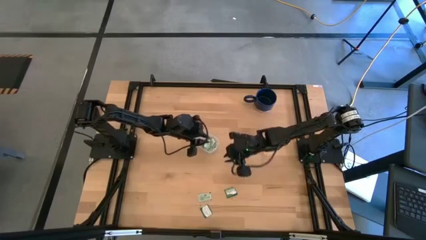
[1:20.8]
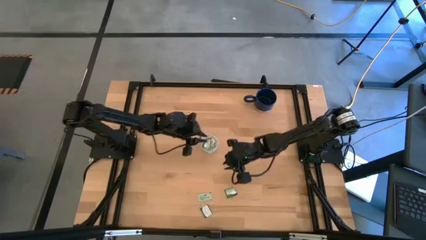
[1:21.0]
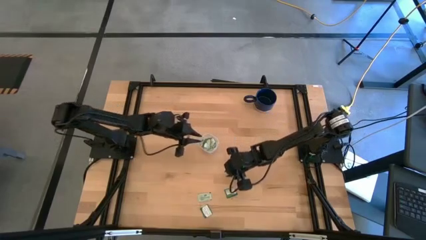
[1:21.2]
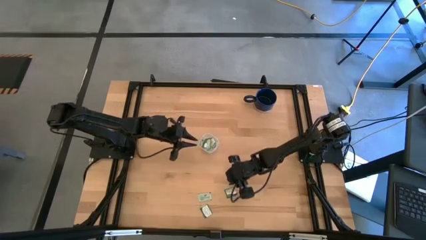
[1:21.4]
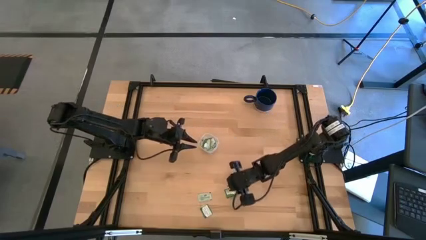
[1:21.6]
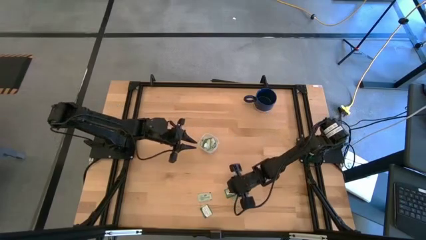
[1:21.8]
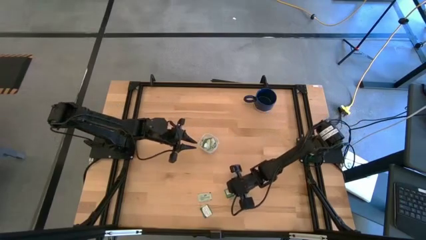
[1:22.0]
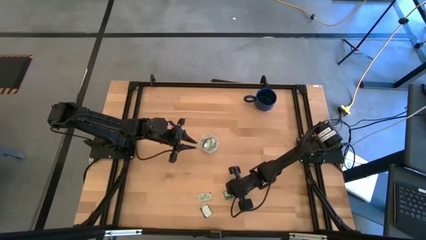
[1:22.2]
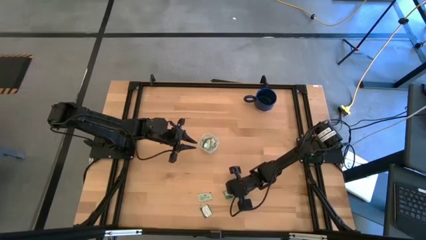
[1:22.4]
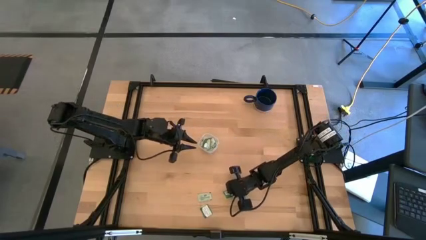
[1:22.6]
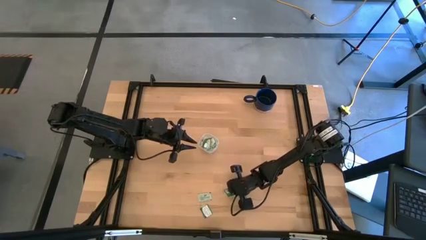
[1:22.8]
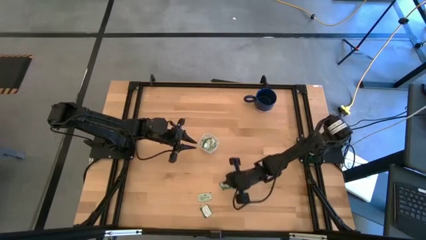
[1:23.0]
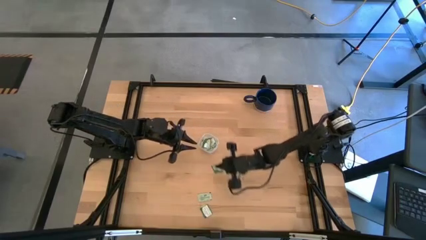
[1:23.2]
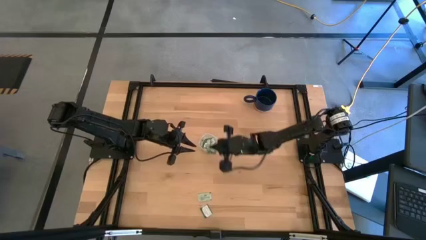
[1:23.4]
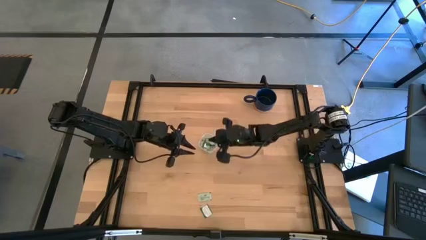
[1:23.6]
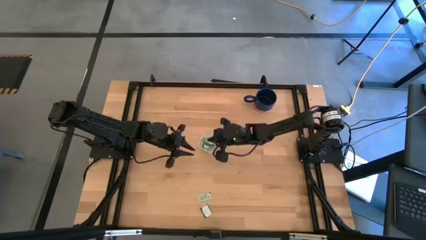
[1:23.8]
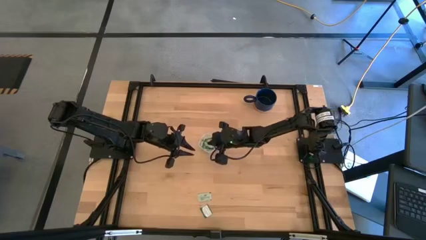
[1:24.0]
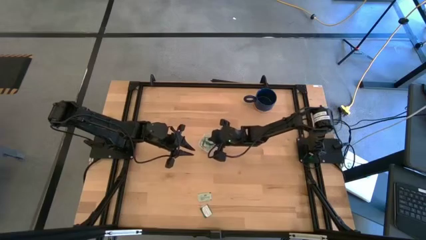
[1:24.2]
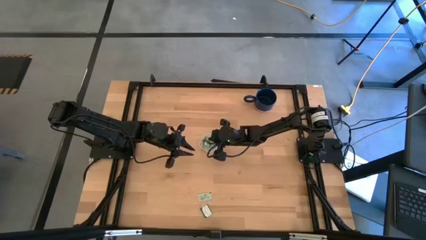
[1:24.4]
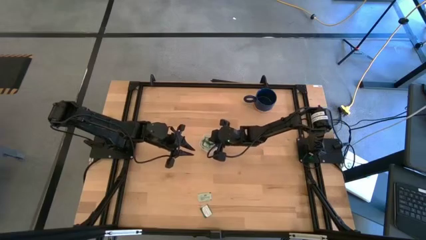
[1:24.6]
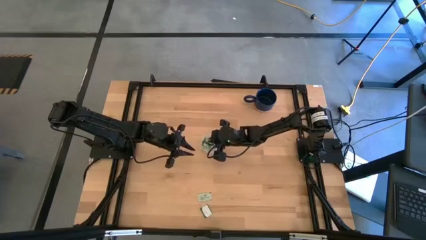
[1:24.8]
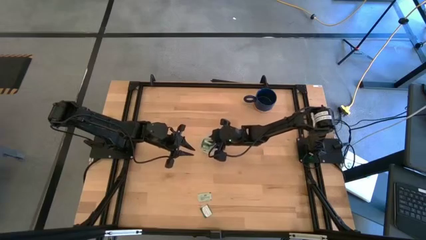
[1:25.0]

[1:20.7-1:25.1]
Task: Pick and place Stevia / Truvia into bins
Put the top right green stevia packet into the container

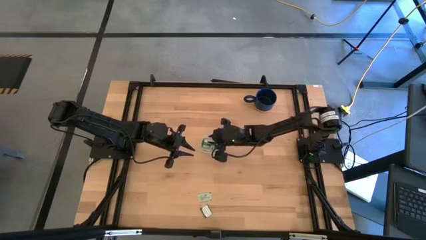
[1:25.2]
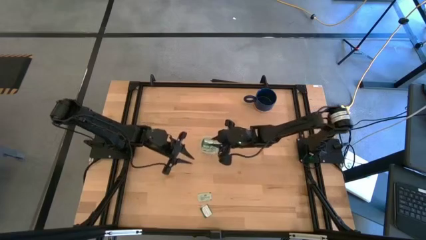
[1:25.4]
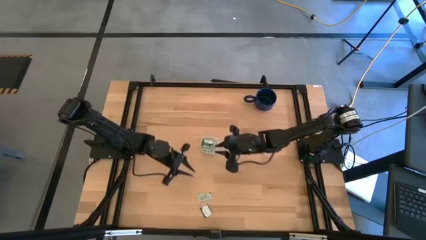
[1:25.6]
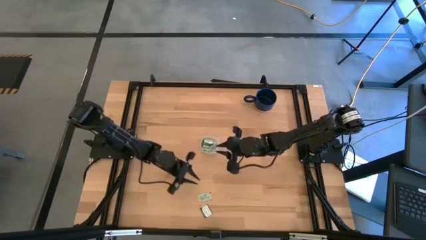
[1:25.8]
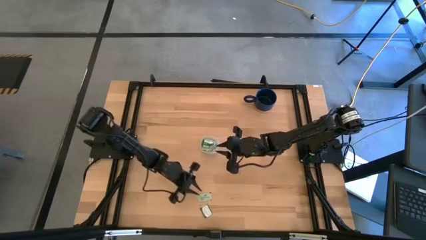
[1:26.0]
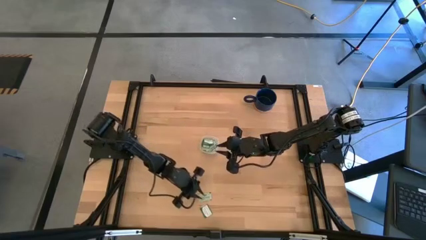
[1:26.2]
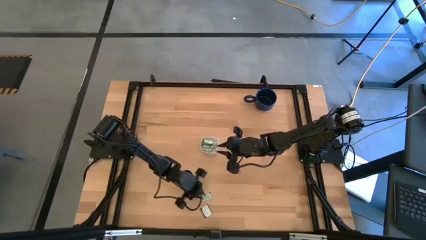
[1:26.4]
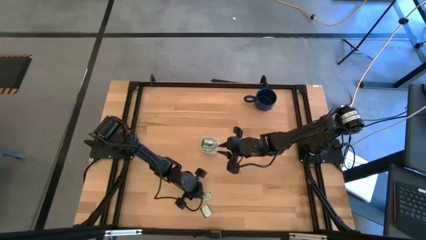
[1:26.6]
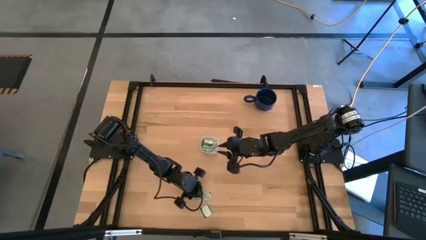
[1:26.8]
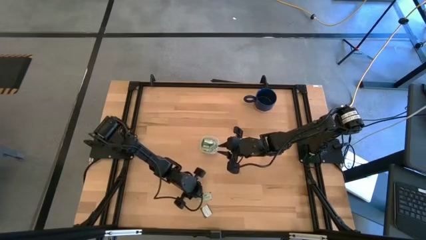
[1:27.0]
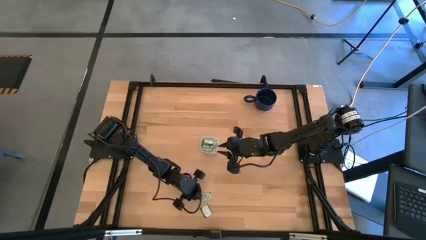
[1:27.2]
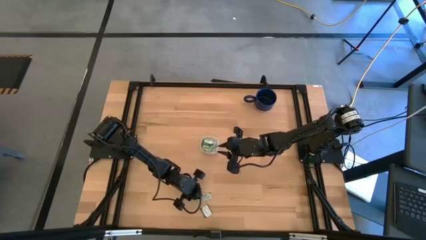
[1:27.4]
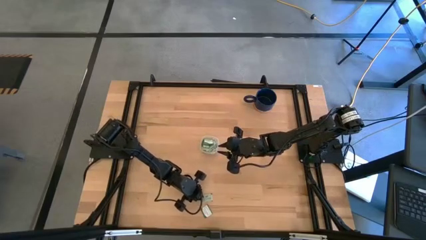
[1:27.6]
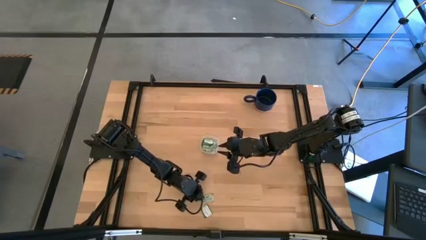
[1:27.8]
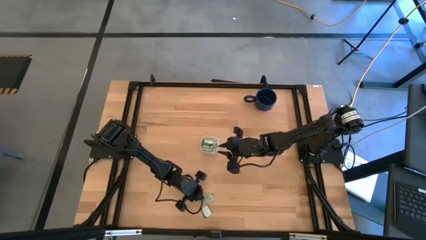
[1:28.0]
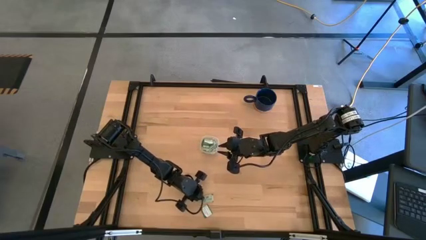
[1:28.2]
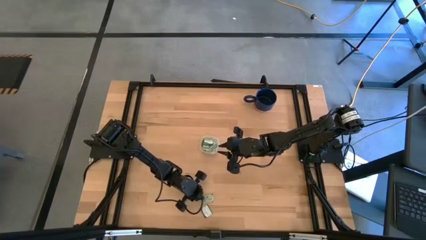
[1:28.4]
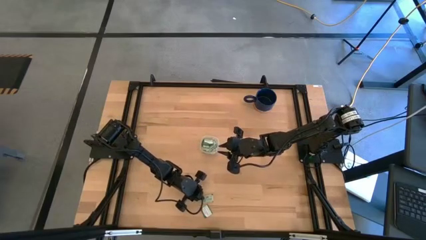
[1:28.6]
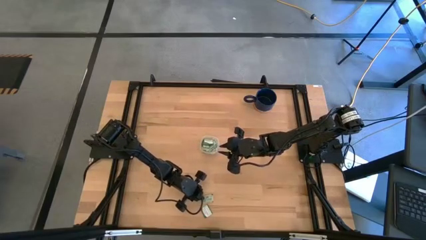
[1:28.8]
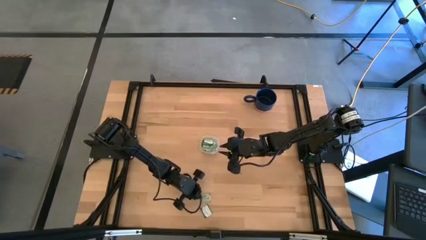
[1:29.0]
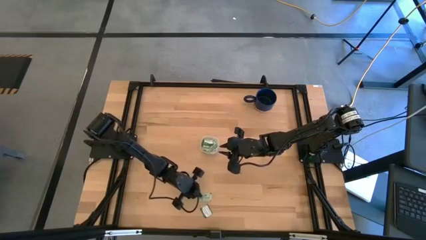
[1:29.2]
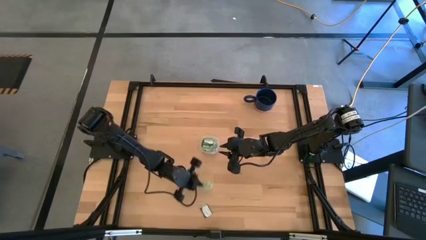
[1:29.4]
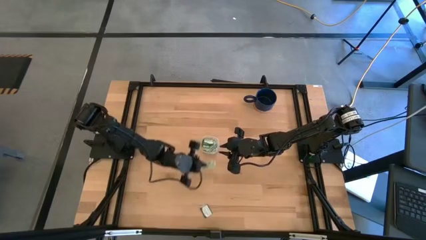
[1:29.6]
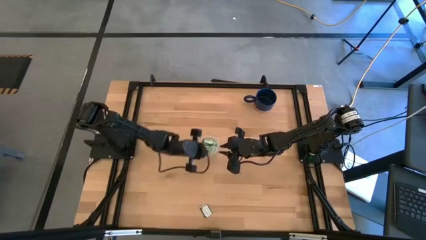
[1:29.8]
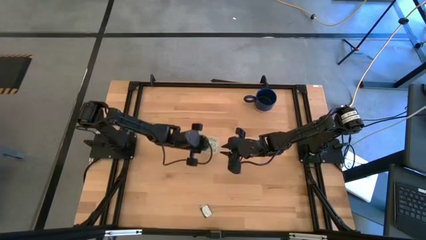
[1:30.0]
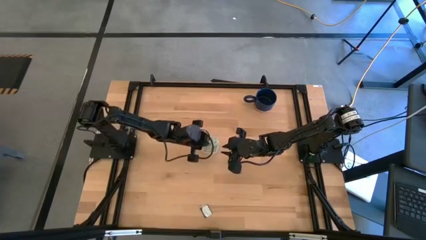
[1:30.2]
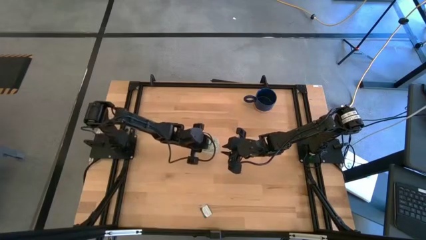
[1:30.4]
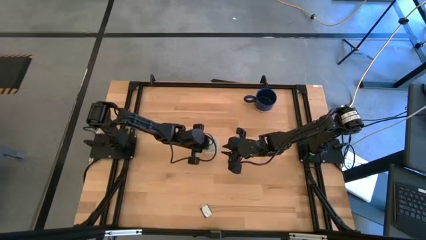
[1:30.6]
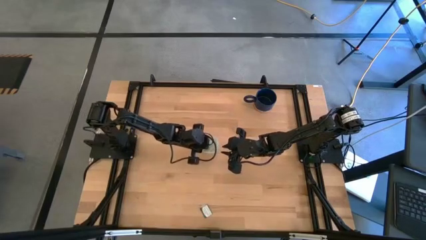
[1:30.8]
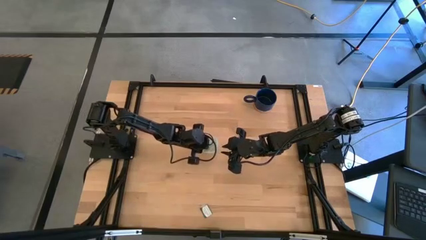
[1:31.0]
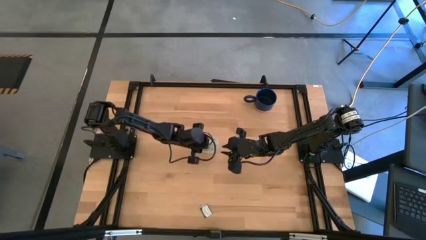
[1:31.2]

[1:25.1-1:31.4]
Put the light green stevia packet into the container

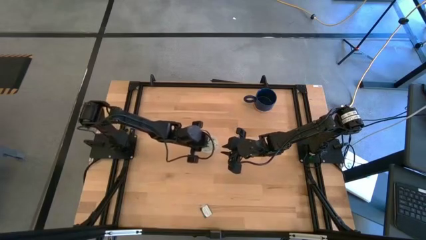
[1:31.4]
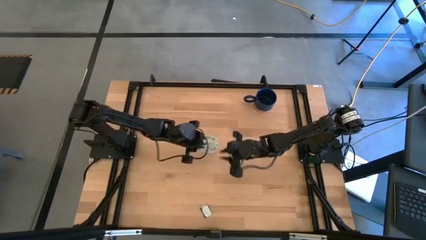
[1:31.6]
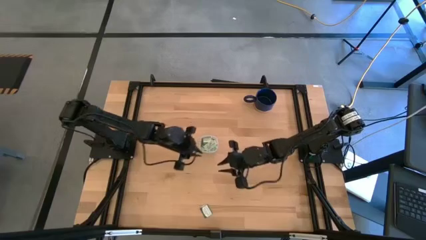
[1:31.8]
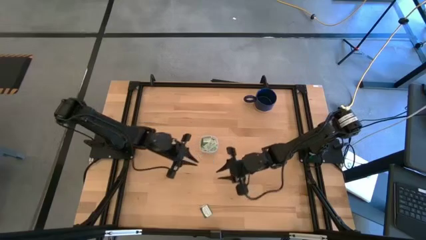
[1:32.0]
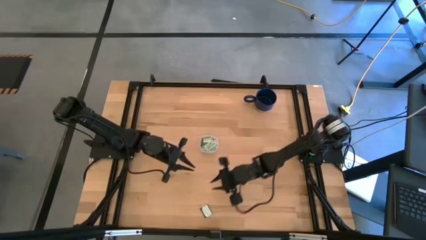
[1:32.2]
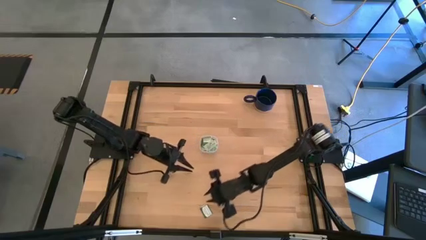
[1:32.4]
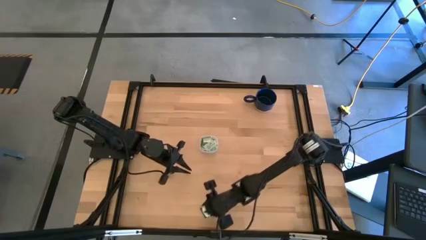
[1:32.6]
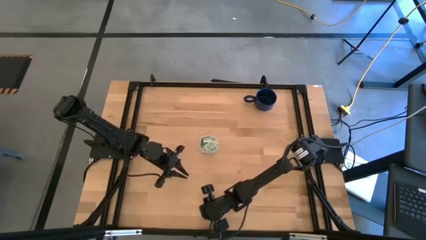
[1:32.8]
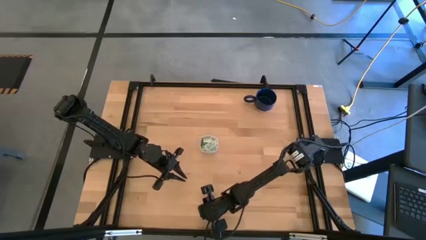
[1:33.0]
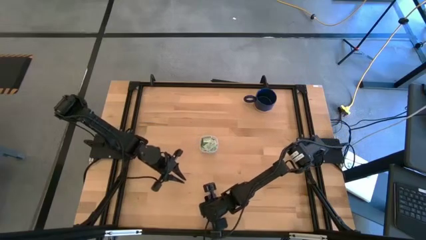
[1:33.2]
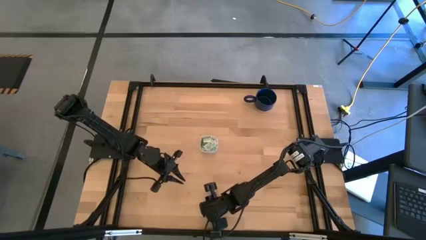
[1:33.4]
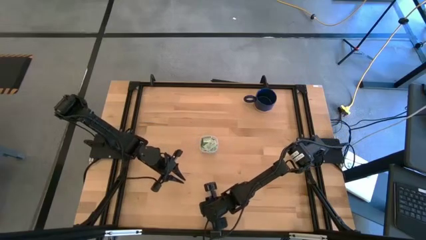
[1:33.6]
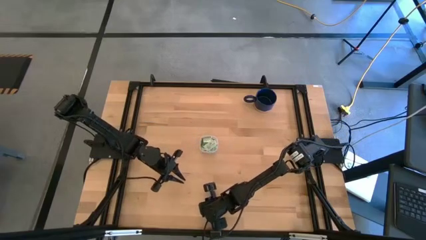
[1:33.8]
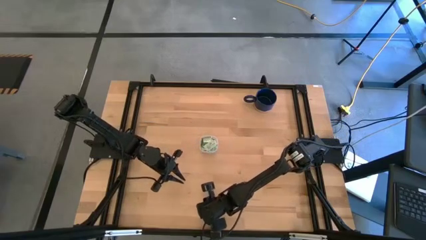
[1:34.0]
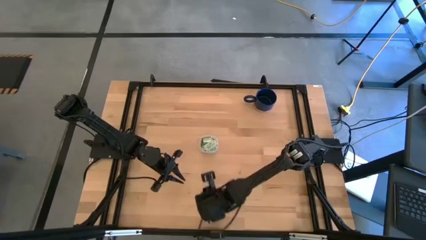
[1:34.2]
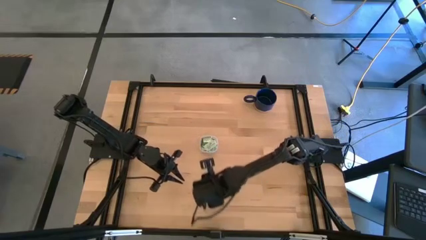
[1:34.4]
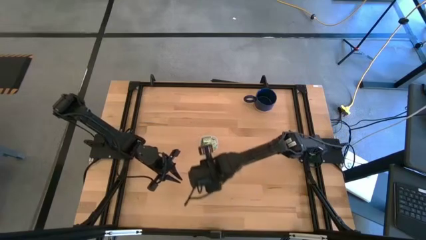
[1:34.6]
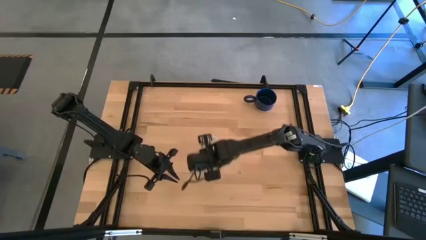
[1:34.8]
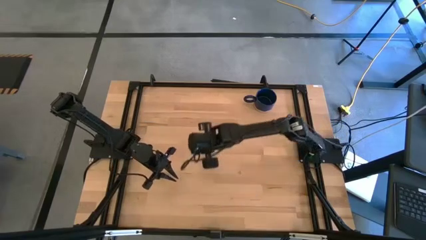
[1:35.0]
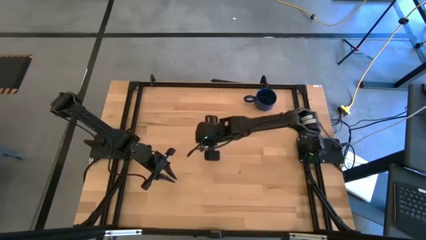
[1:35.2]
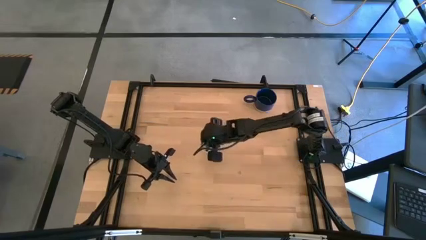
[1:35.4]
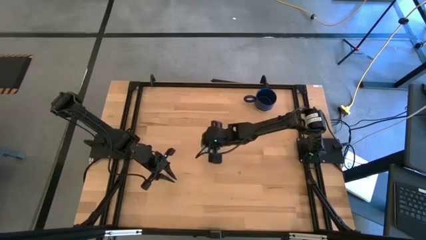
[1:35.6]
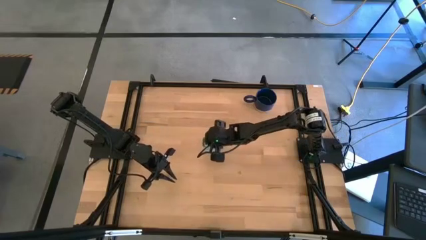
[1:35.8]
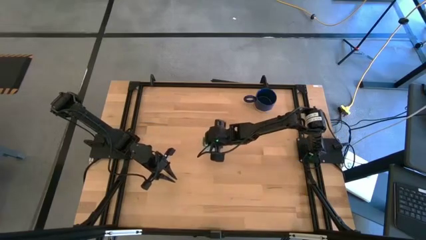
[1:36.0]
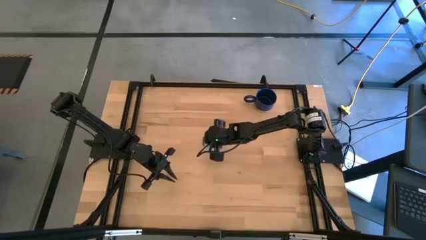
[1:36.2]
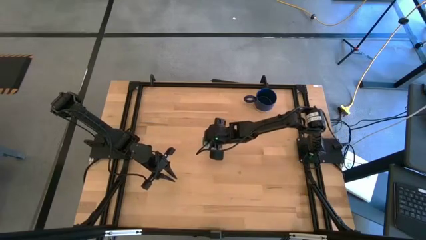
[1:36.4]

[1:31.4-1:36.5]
Put the green stevia packet into the container

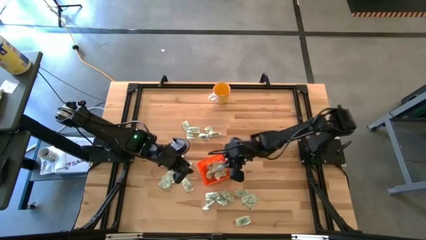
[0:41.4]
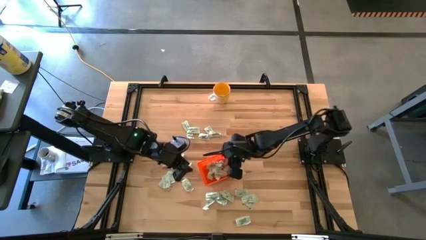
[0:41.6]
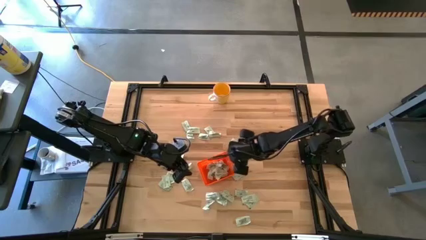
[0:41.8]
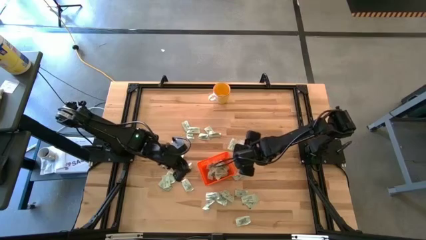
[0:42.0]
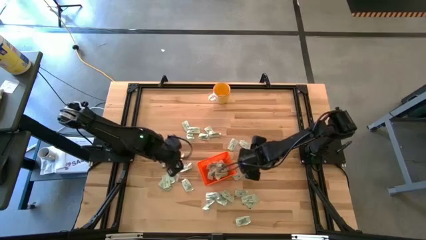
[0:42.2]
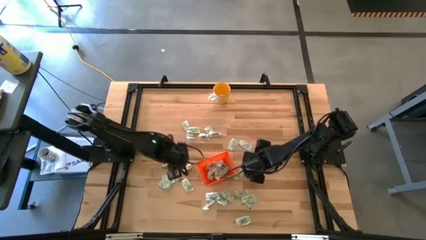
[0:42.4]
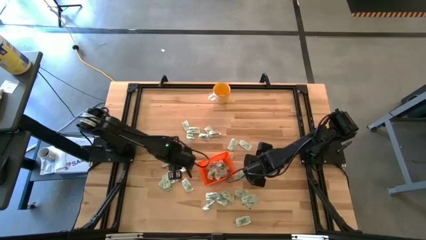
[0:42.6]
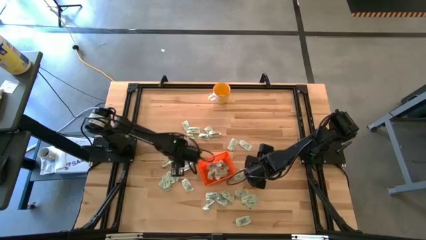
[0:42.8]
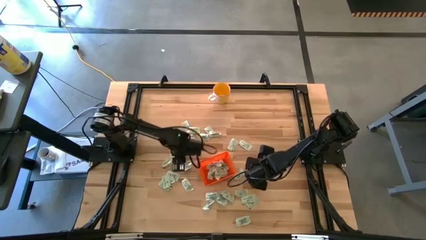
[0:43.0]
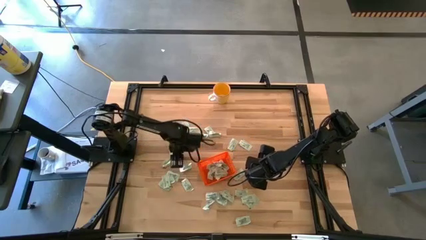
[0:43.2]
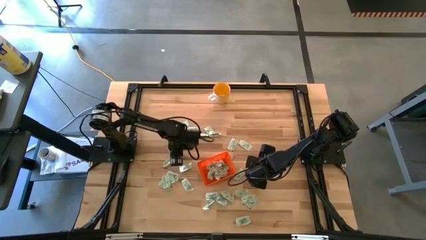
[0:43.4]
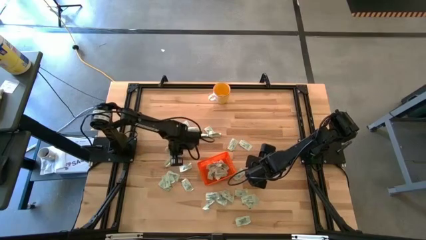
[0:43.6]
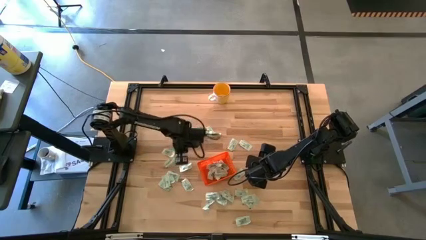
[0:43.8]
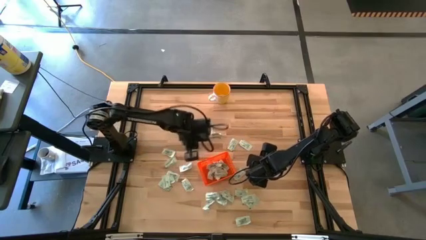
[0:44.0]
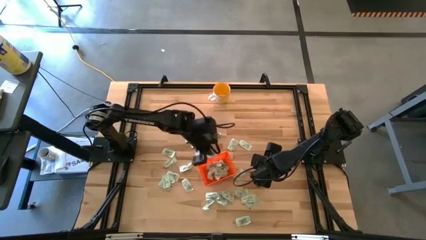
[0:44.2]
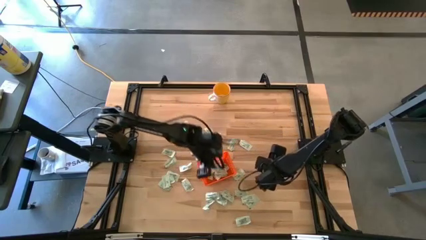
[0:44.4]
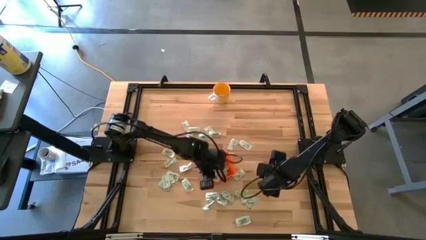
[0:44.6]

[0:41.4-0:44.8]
Task: Pick and place Stevia / Truvia into bins
Put the stevia packet into the bin
